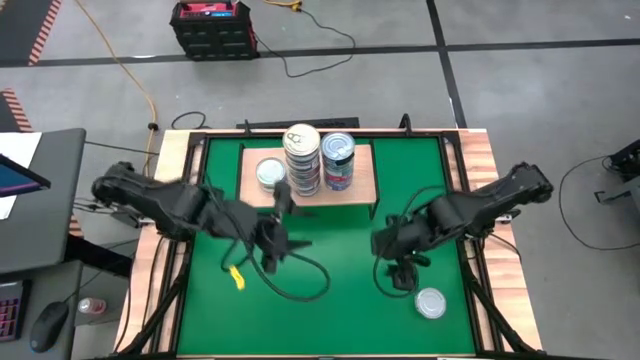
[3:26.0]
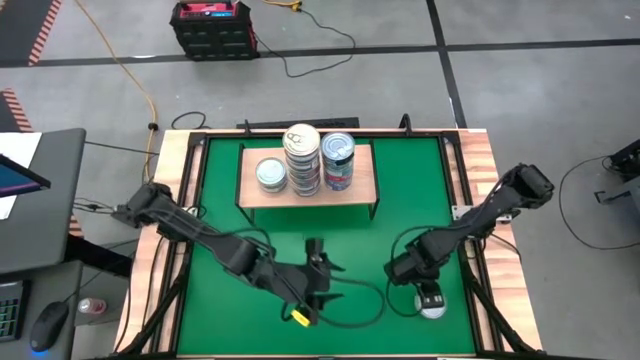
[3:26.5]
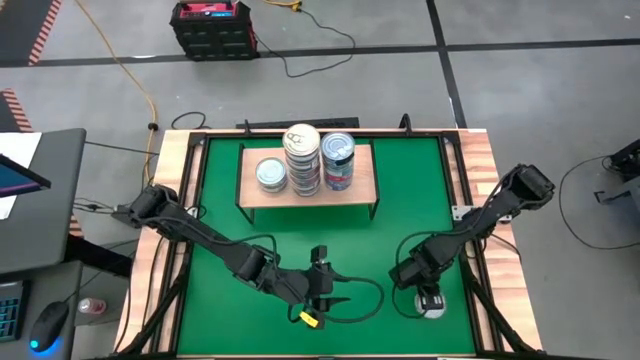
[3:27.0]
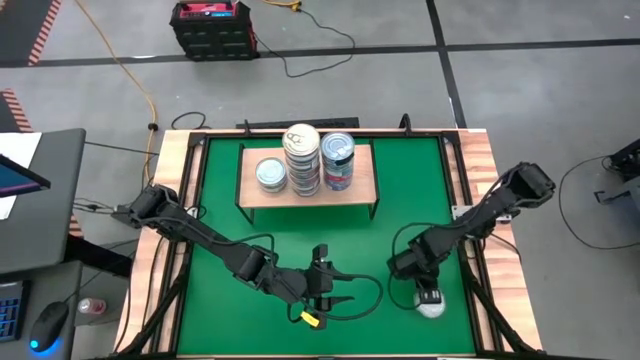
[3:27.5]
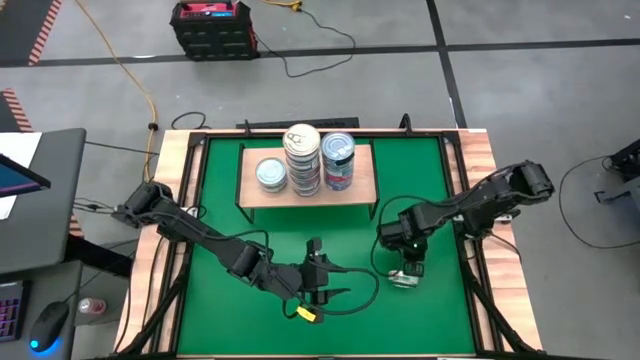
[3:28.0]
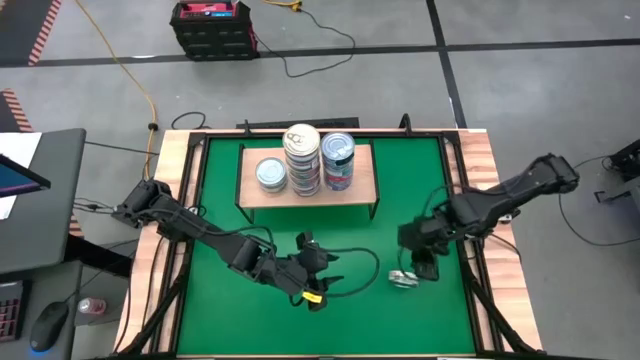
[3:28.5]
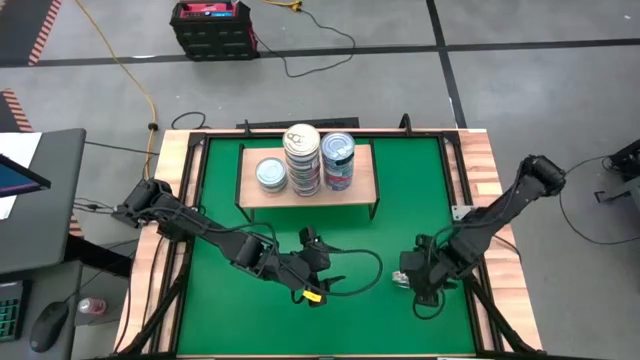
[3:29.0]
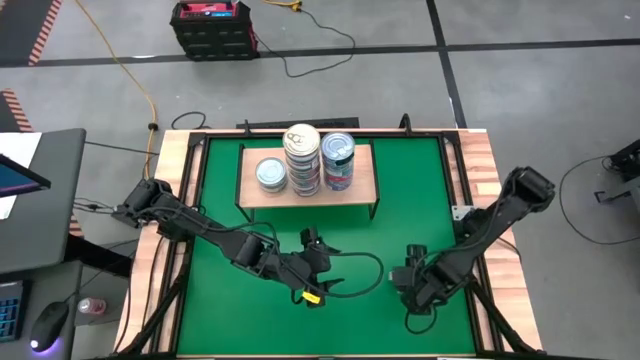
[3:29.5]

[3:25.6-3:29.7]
Task: Stack canned seafood by type on shelf
Stack the green and white tuna can on top of the green and white tuna cans

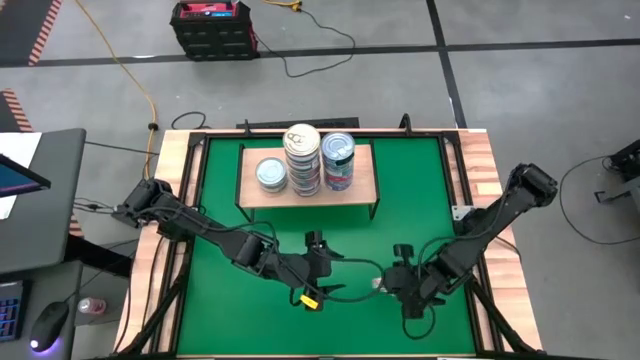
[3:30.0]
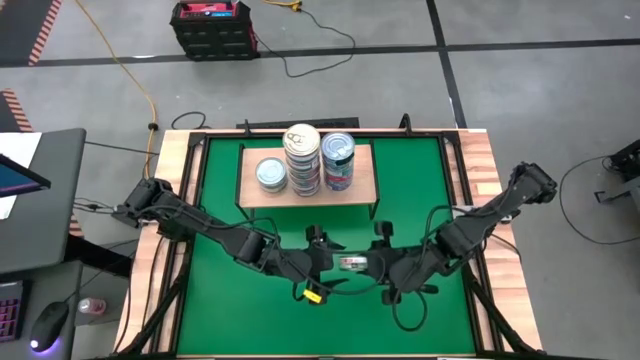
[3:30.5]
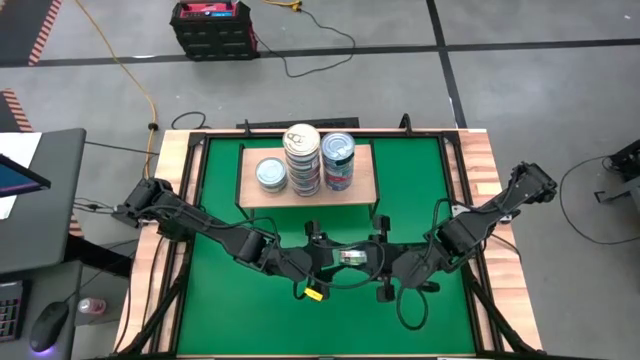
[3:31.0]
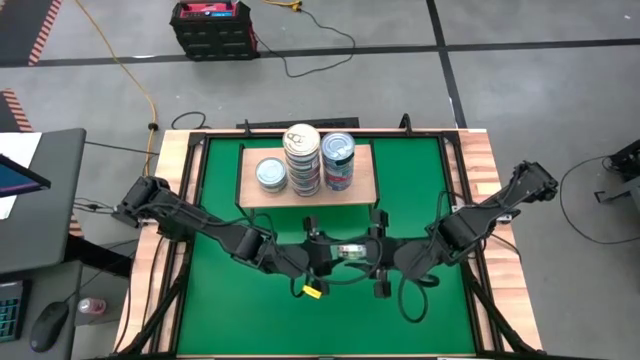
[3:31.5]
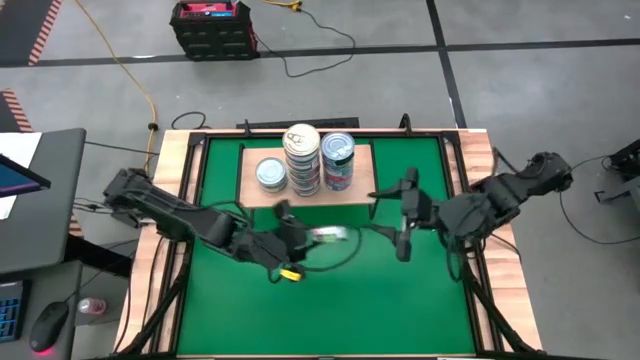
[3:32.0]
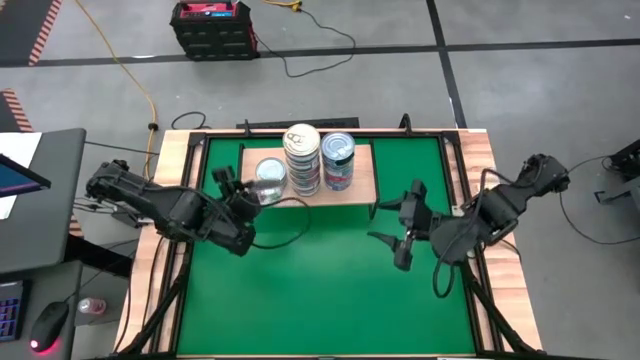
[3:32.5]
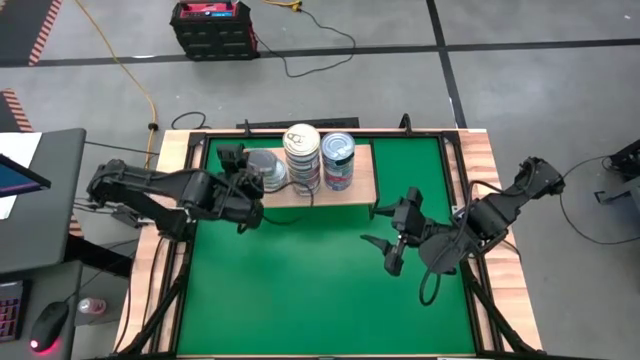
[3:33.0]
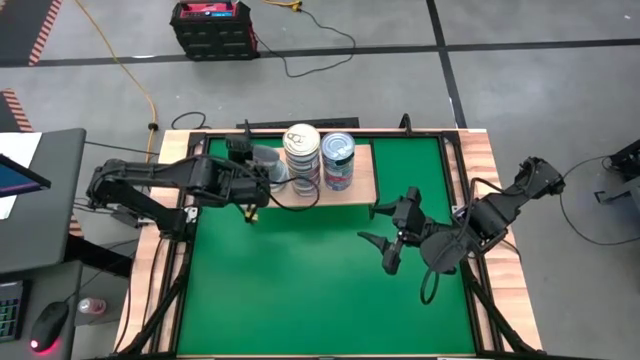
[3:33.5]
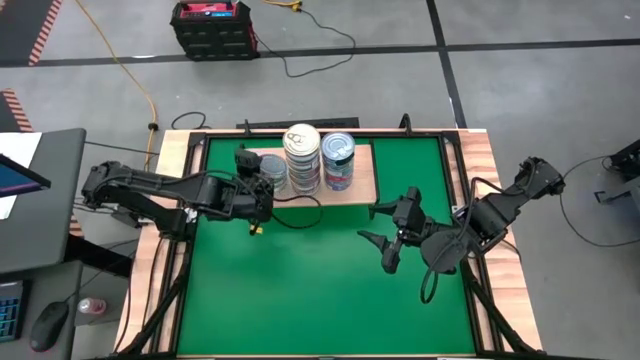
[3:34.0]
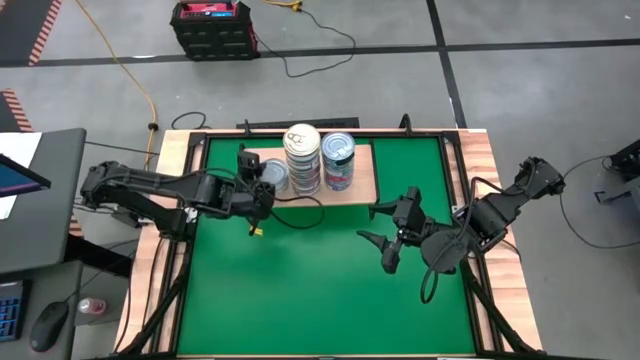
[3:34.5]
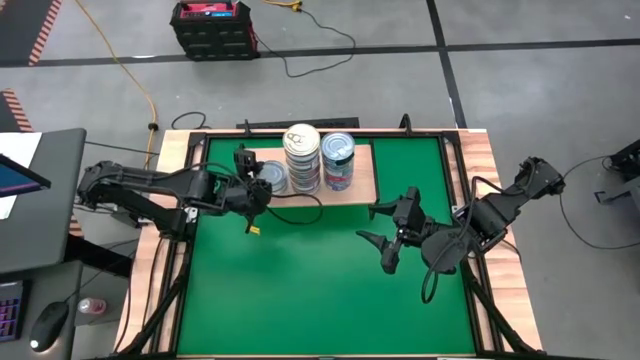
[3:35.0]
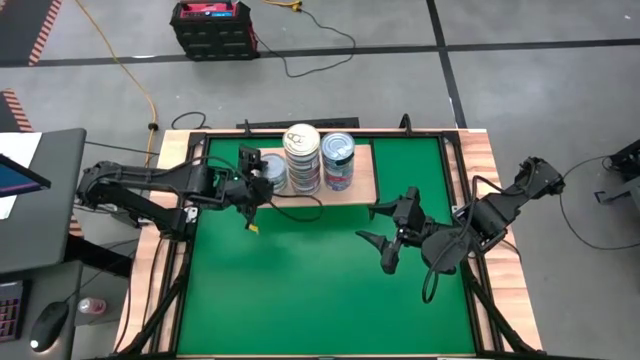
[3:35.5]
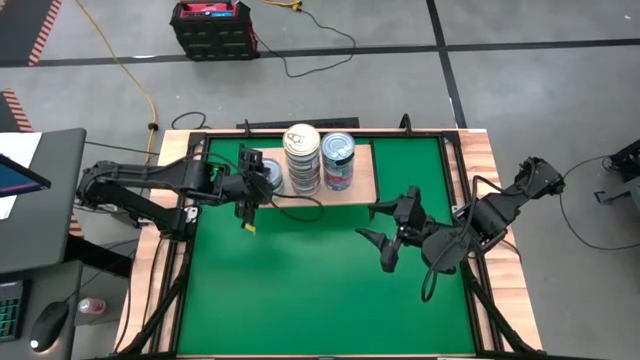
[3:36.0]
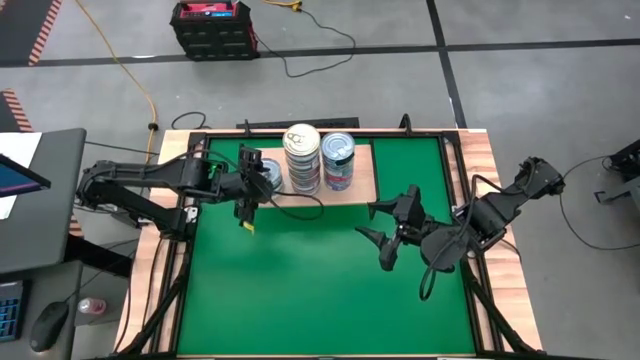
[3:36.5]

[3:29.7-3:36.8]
Stack the green and white tuna can on top of the green and white tuna cans

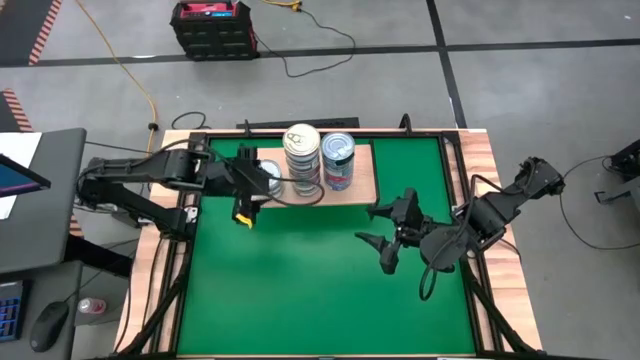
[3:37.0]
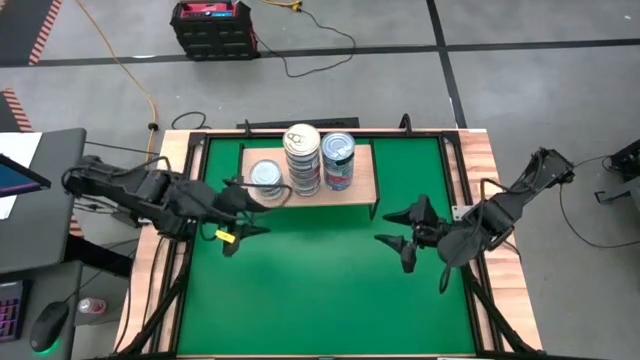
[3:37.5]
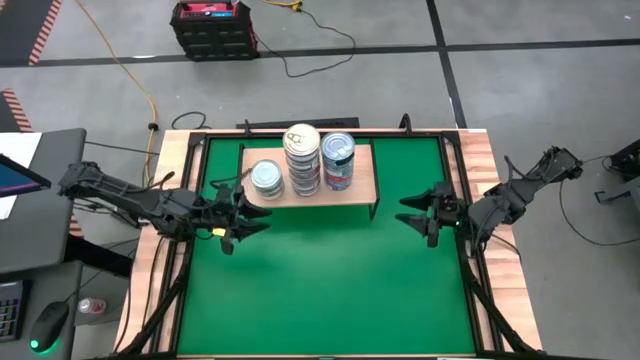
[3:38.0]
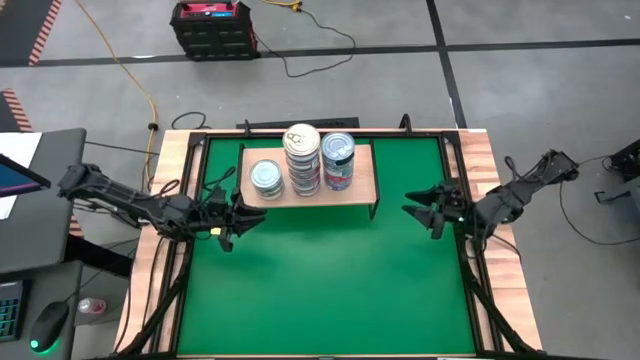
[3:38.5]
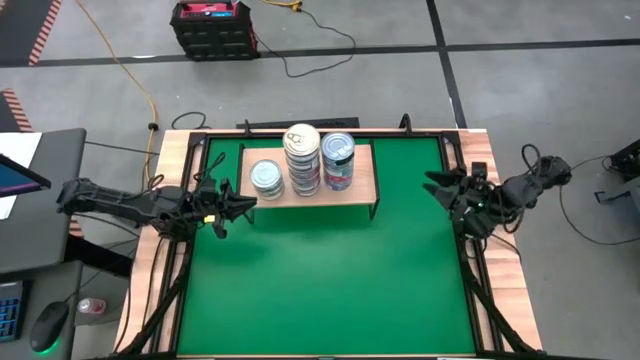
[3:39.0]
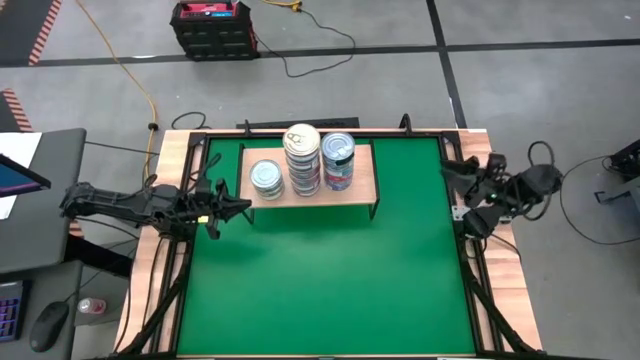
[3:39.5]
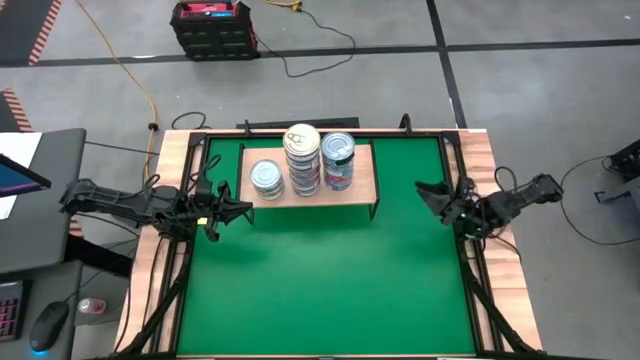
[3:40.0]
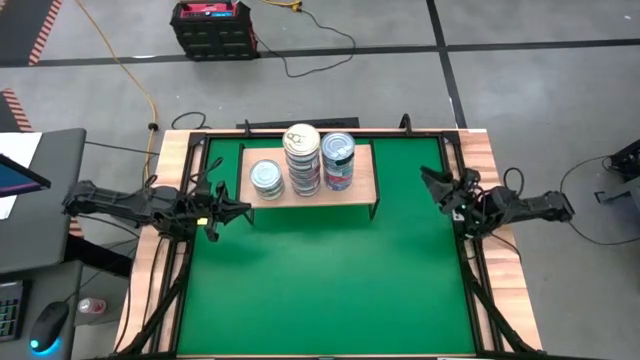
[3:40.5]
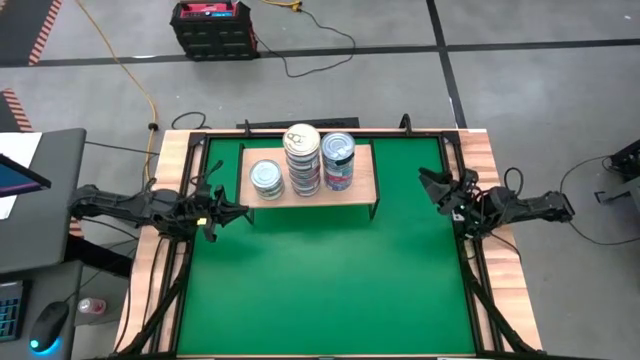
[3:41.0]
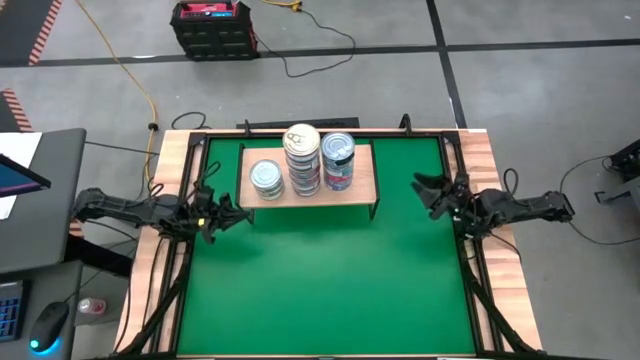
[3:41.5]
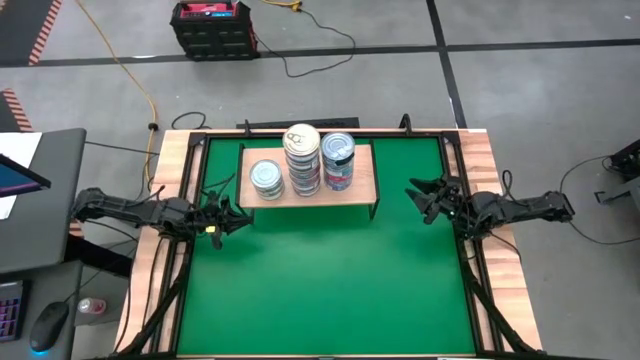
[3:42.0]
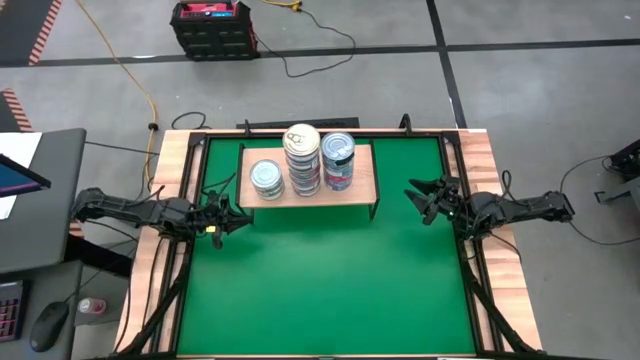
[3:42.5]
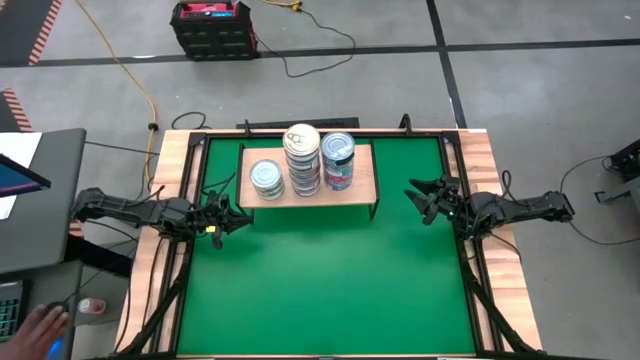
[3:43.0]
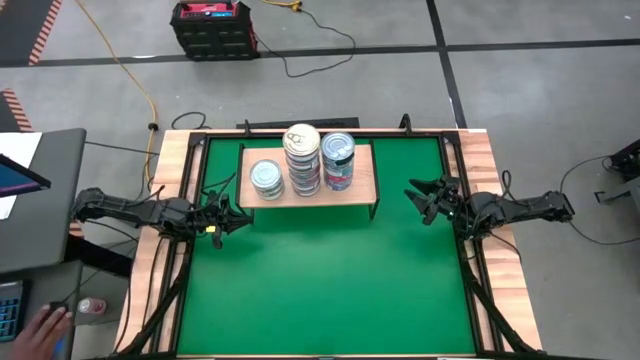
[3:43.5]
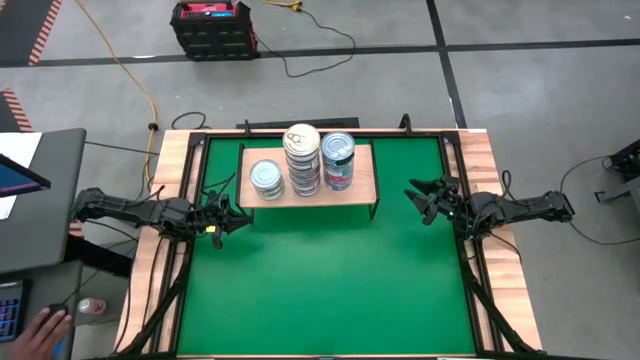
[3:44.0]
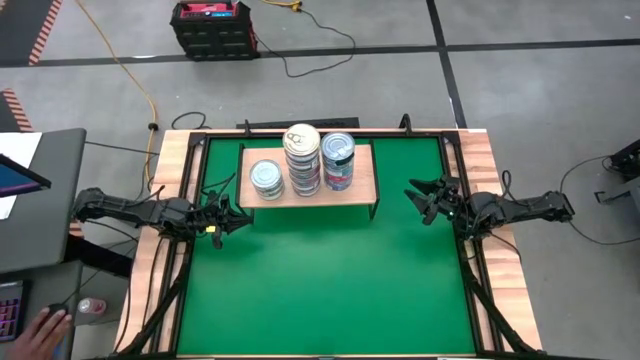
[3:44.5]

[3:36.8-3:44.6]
Return to Home Position

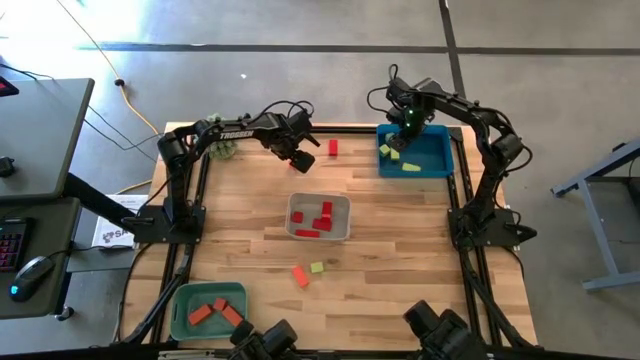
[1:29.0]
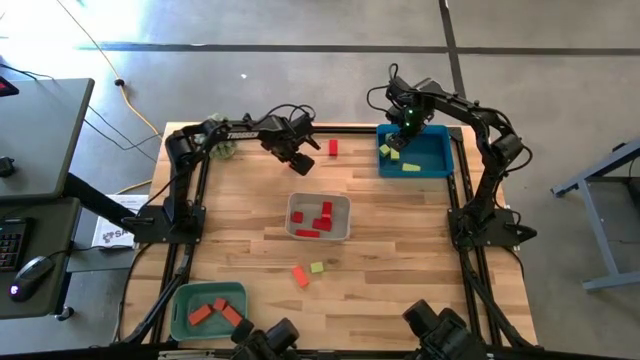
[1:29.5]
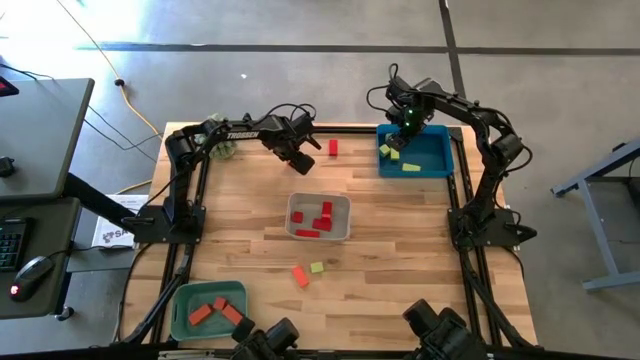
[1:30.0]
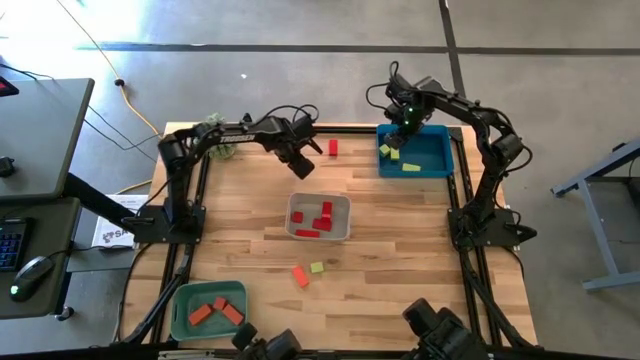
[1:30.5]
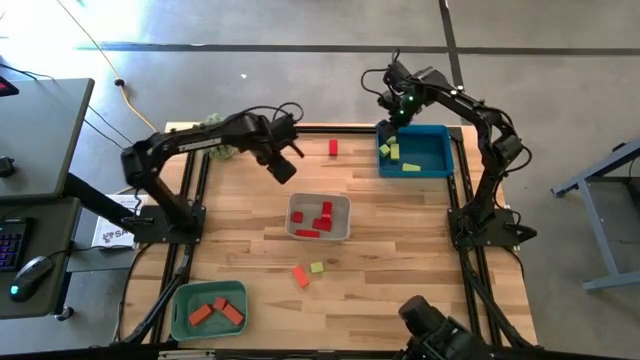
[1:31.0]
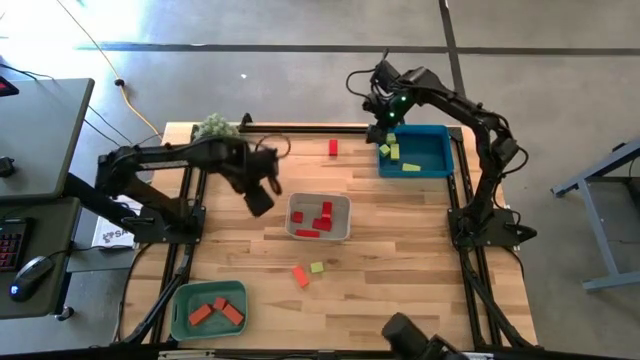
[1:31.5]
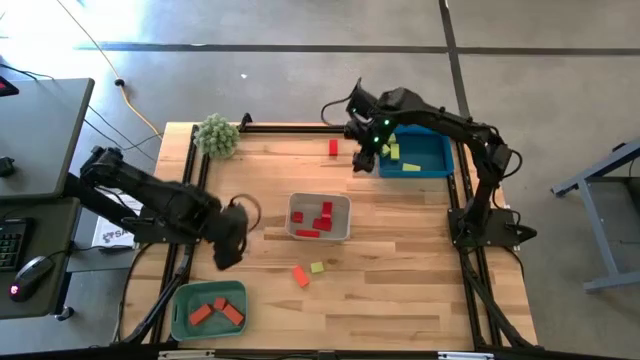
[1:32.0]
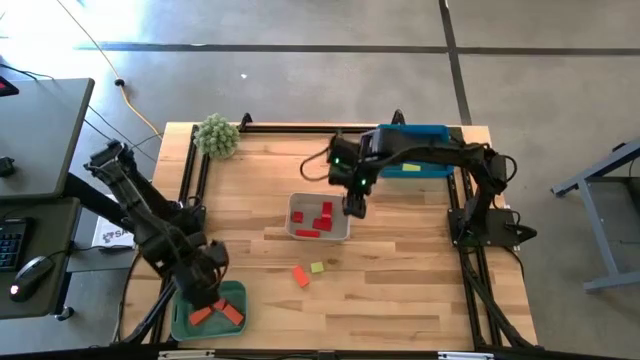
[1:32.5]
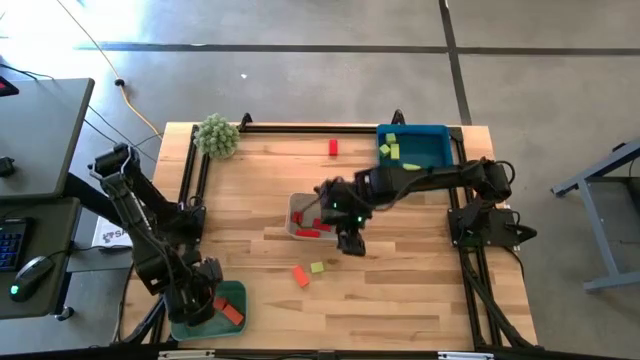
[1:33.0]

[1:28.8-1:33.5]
Task: Sort & place blocks by color
Put the orange wooden block into the green bin
